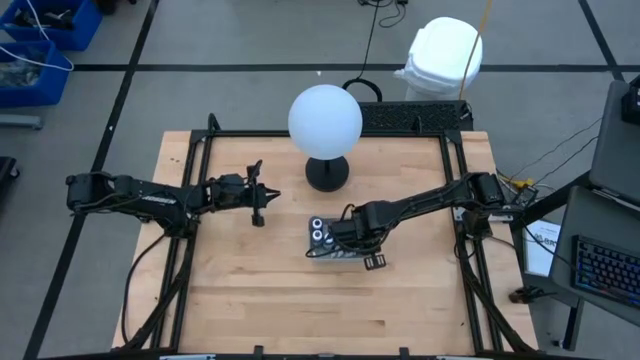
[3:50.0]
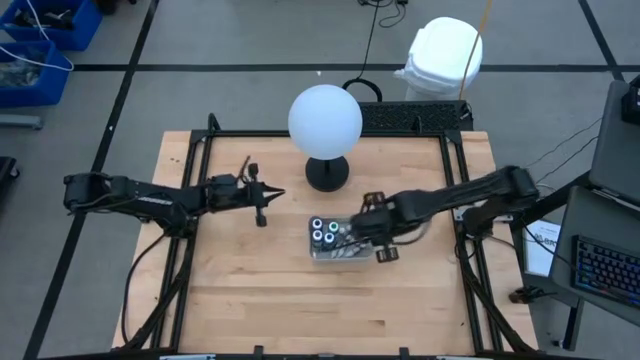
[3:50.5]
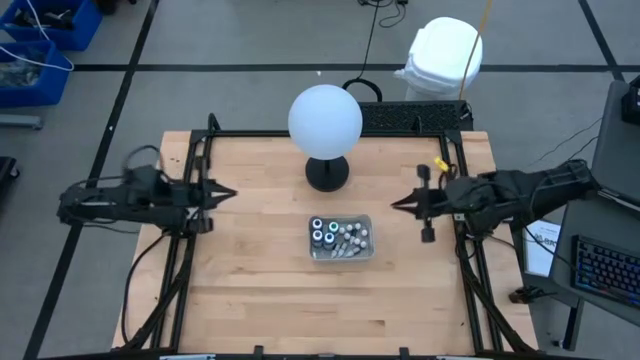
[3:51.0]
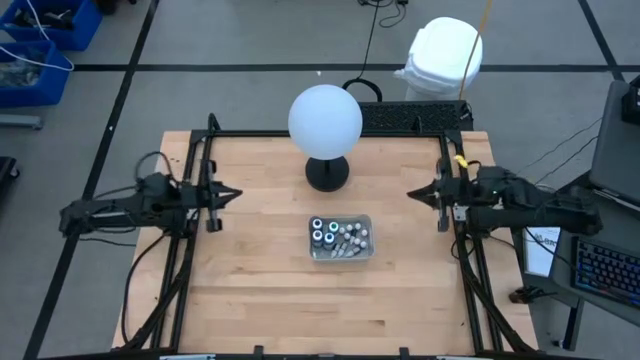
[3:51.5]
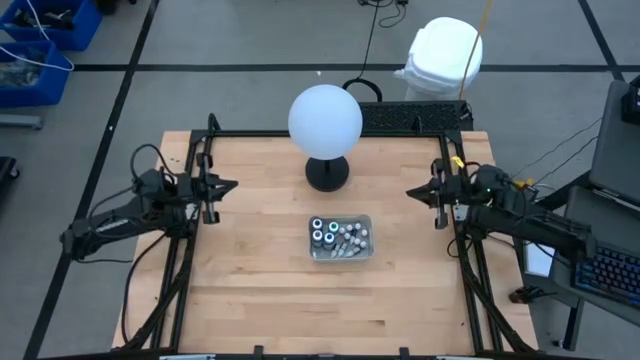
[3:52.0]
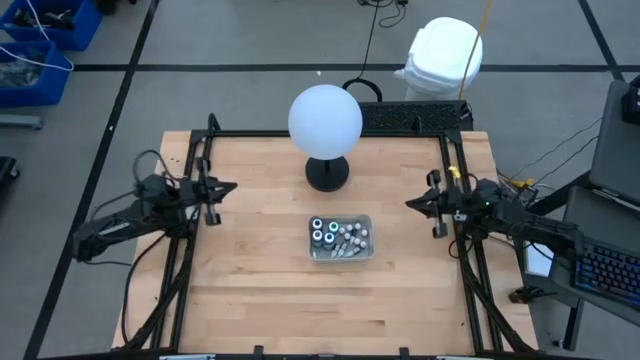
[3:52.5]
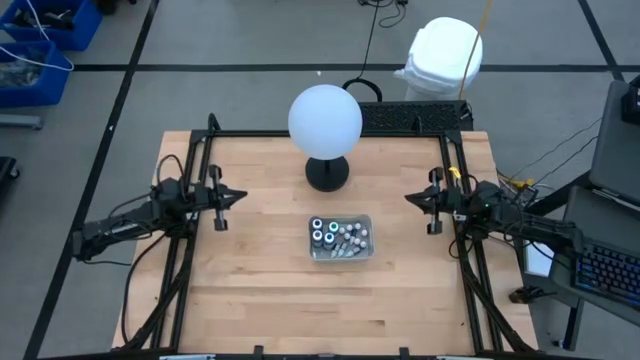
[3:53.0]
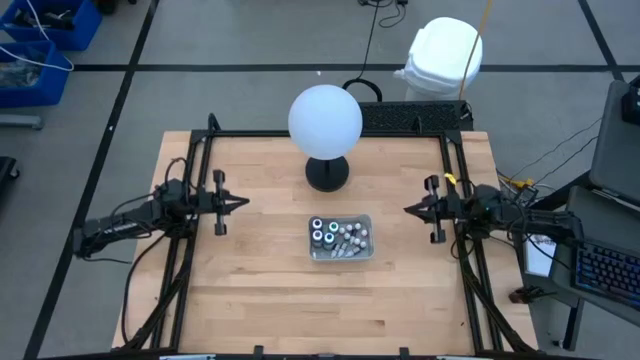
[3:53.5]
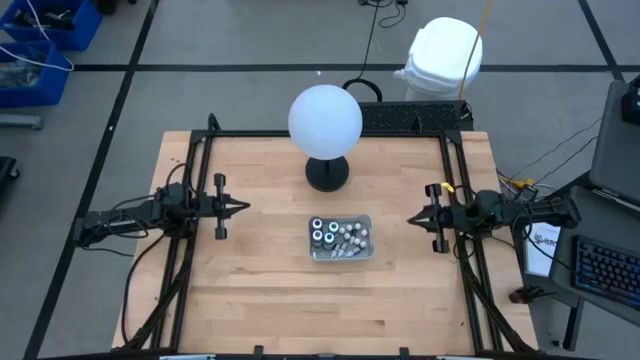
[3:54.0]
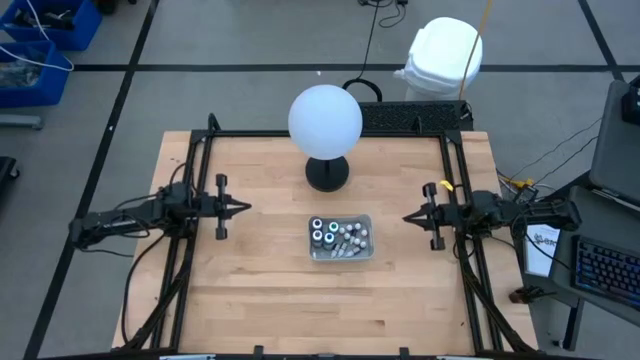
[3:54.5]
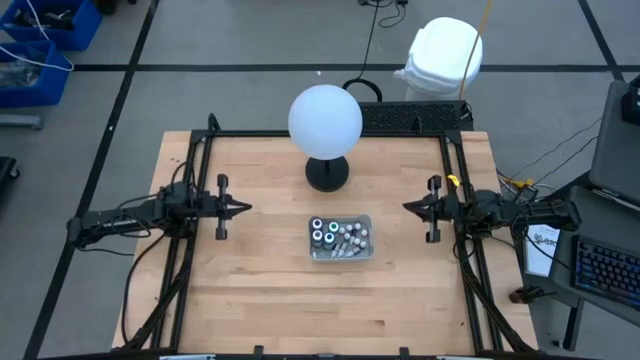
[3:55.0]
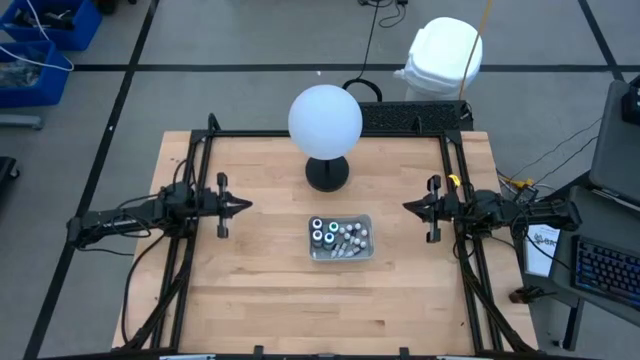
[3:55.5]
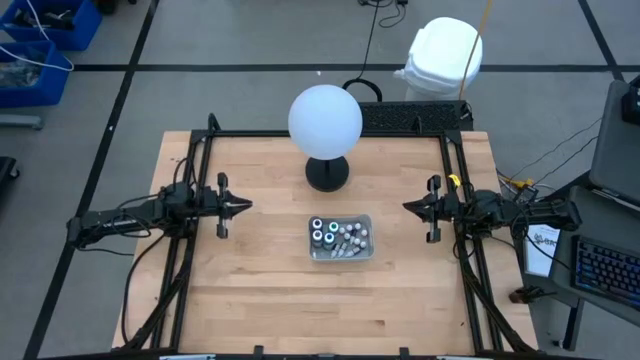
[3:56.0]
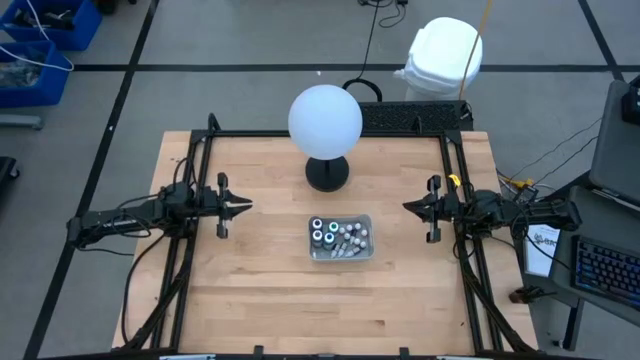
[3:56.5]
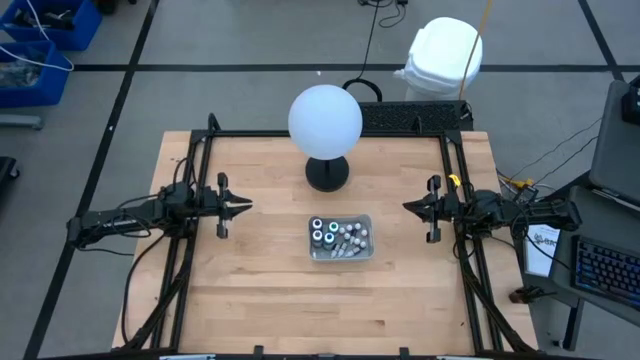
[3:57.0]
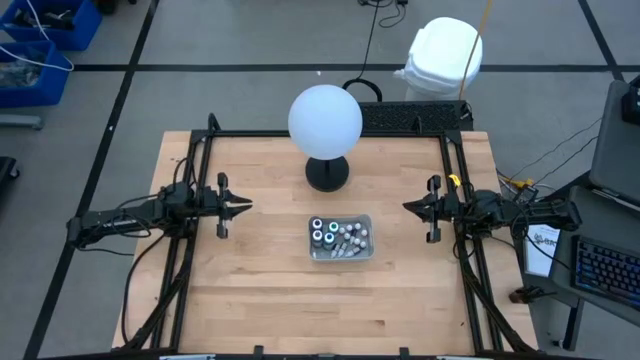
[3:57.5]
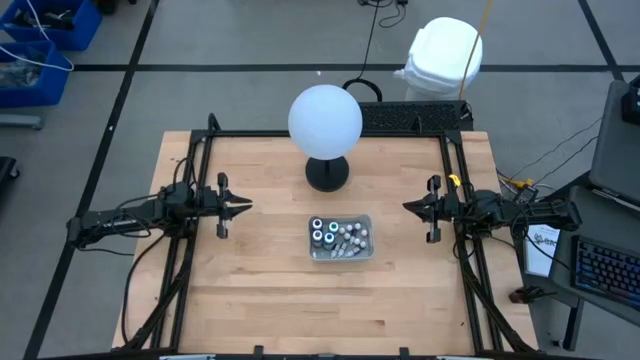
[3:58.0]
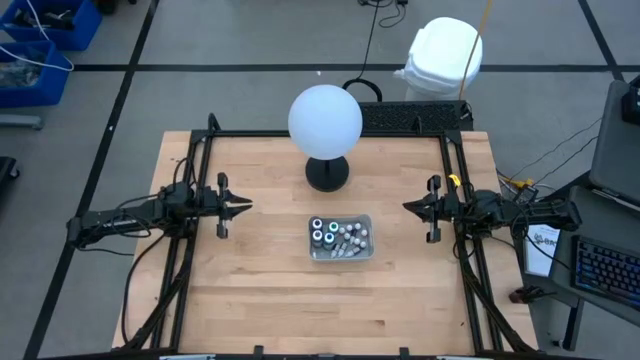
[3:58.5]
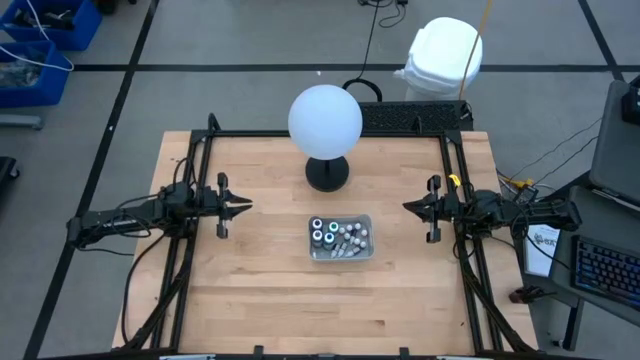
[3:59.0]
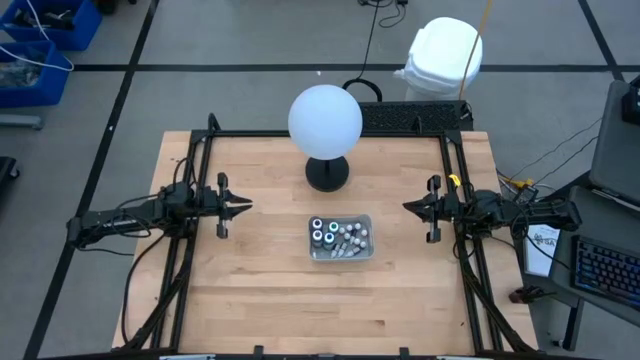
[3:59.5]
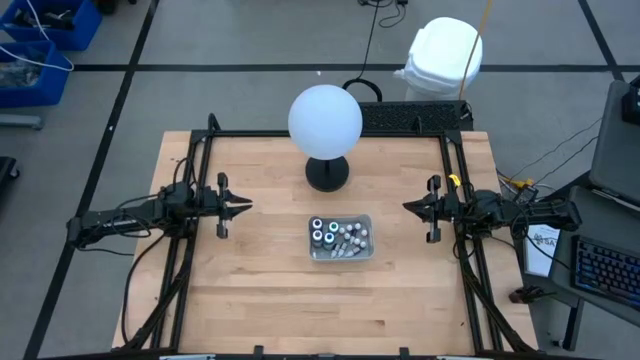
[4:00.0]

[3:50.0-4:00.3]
Task: Pick & Place food coloring
Return to Home Position

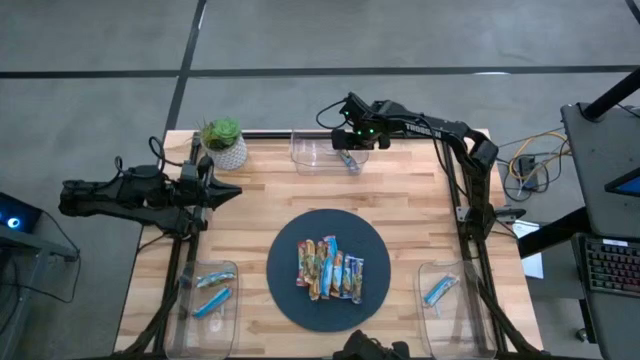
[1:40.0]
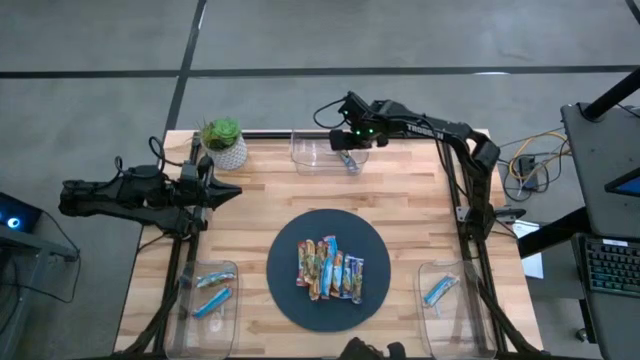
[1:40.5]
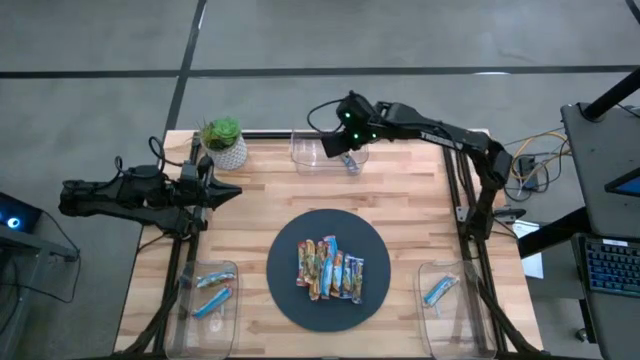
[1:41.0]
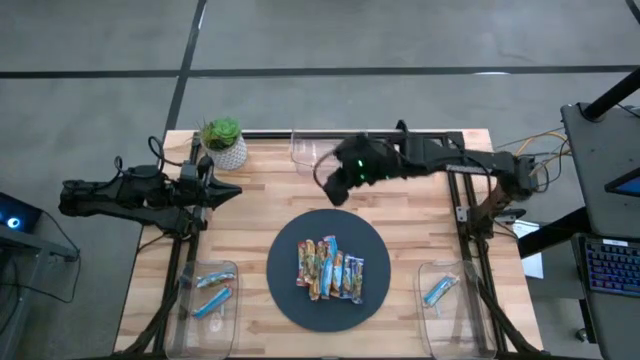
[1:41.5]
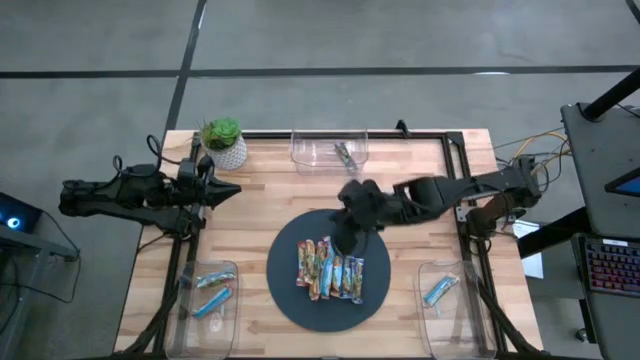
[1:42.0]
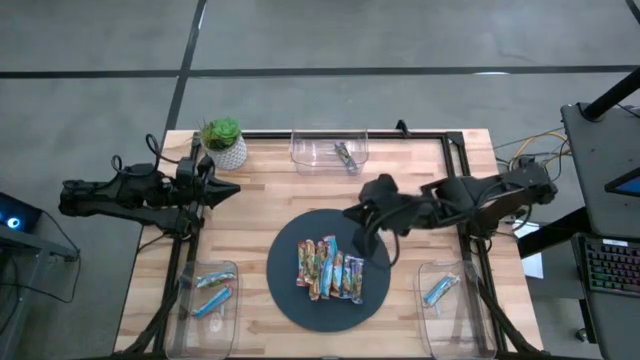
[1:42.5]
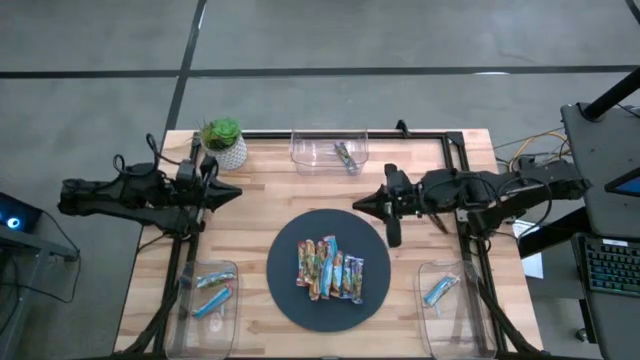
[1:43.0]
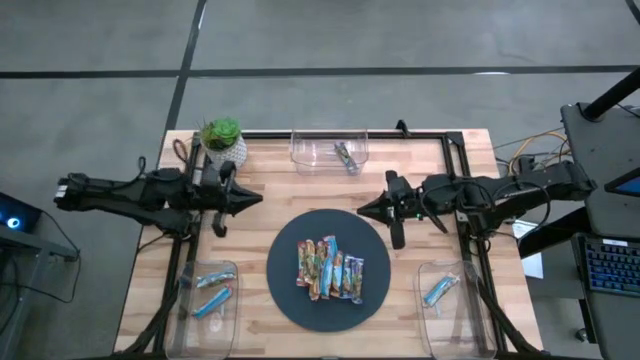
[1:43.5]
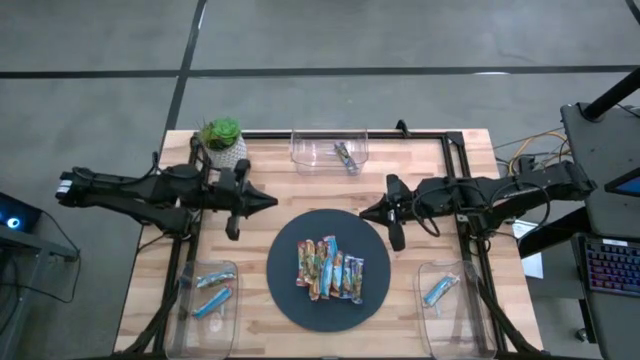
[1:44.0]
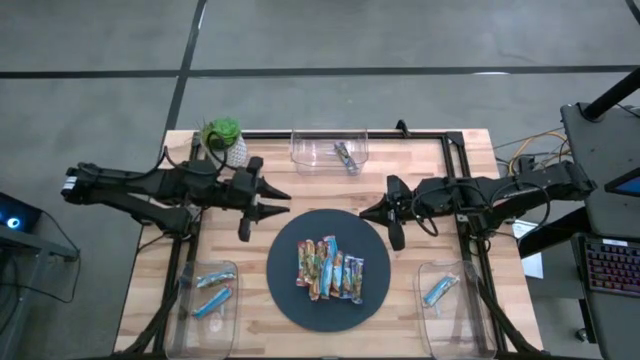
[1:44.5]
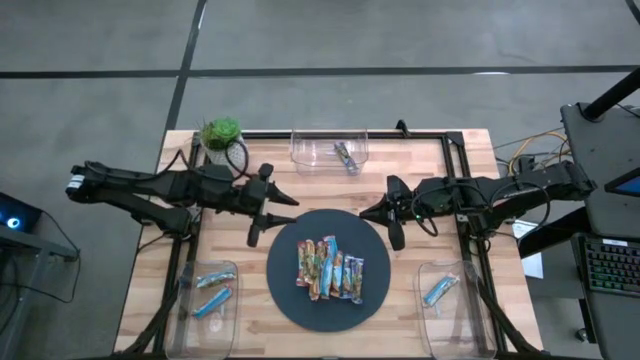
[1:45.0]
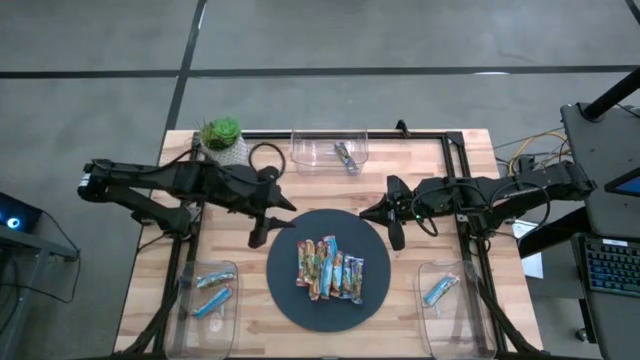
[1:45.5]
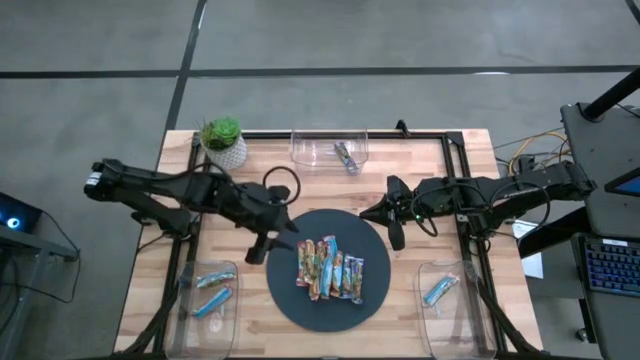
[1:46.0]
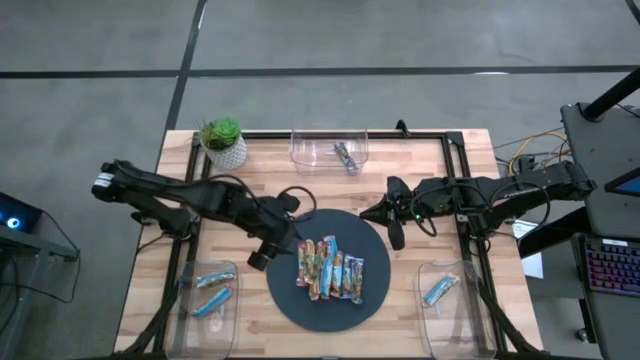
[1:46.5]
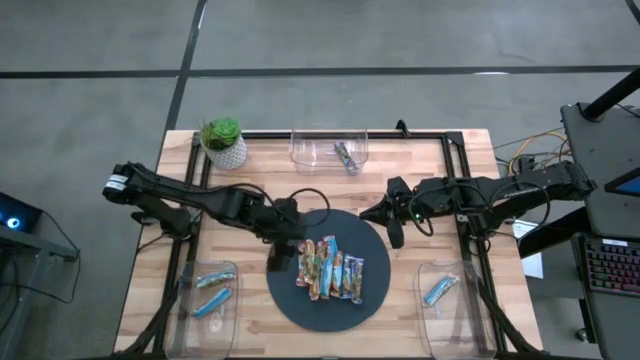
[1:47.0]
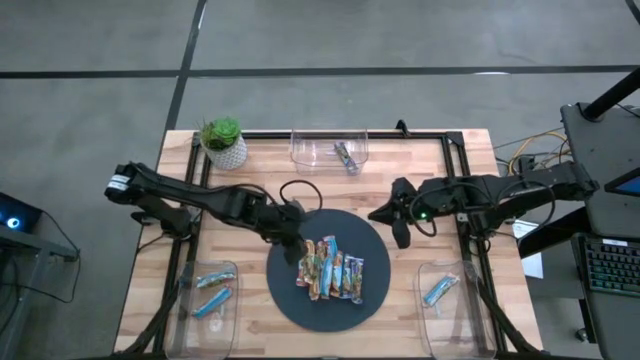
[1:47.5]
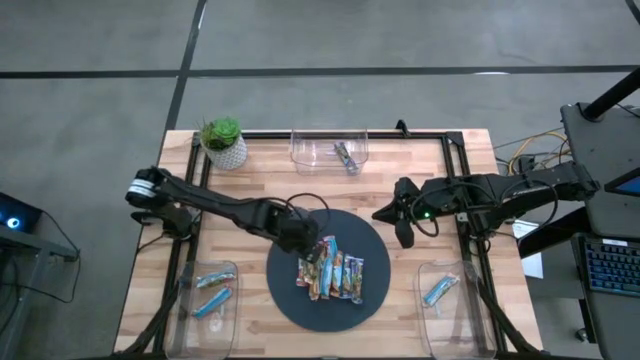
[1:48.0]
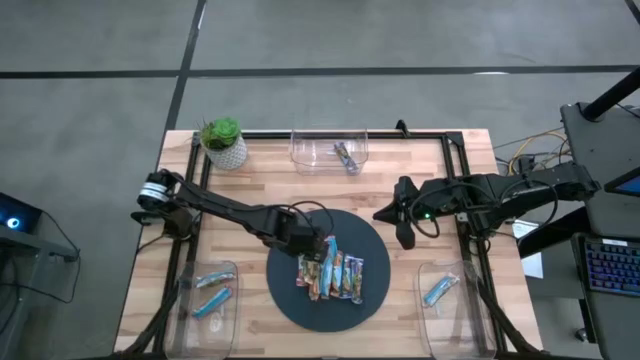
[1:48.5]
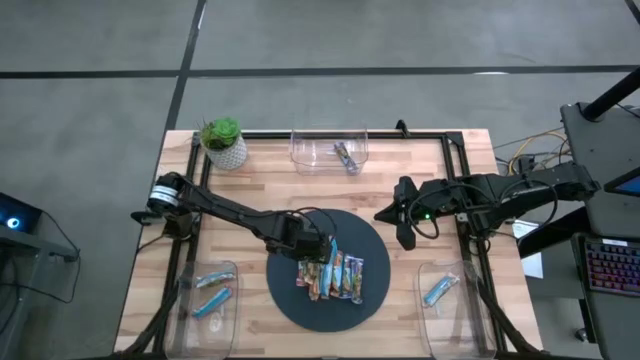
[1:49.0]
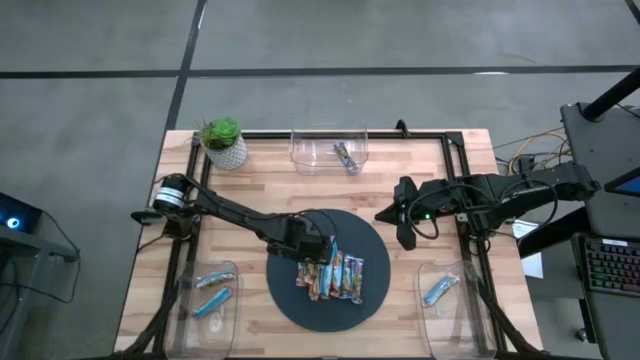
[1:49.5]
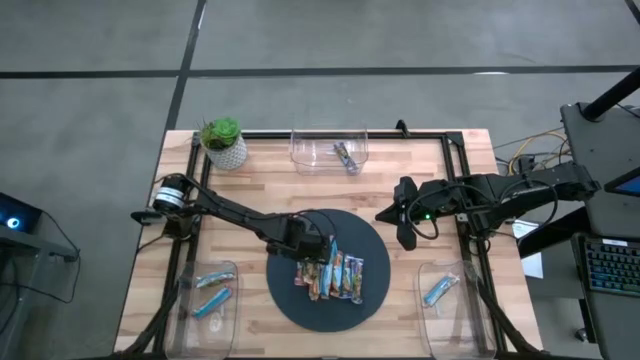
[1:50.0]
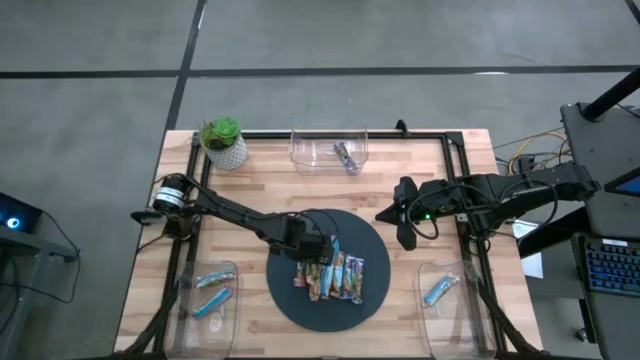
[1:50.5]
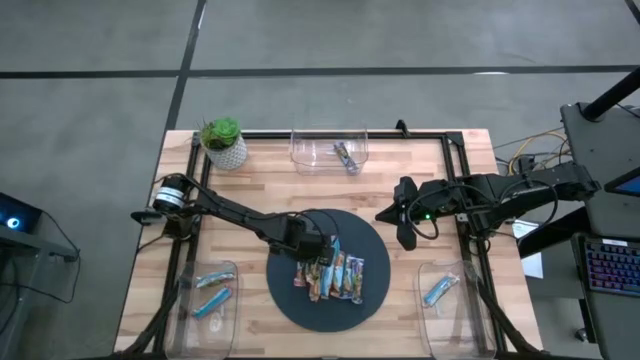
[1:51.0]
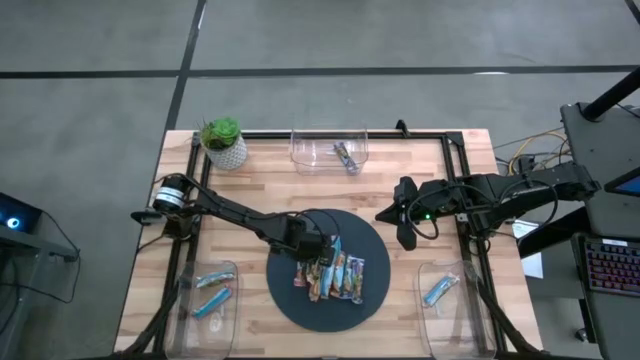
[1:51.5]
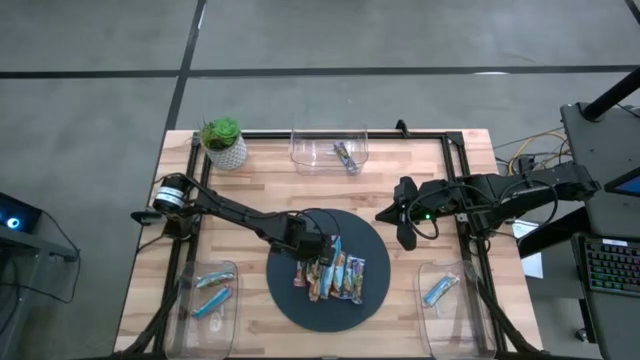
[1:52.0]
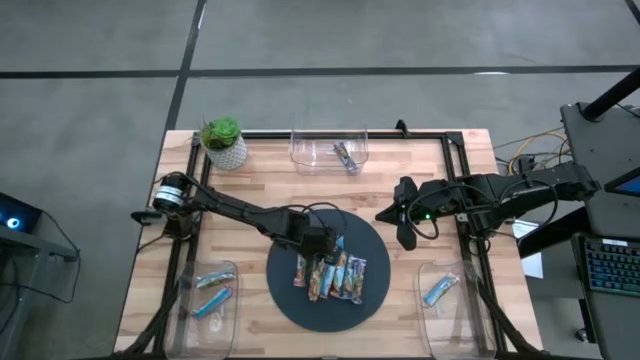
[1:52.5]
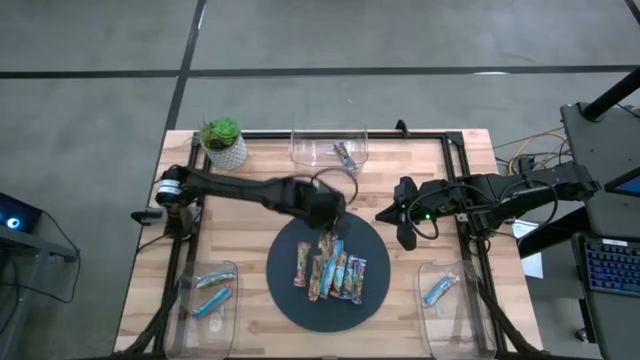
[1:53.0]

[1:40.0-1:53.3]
Task: Pick and place Granola Bars by type
Put the yellow granola bar into the bottom right transparent bin
